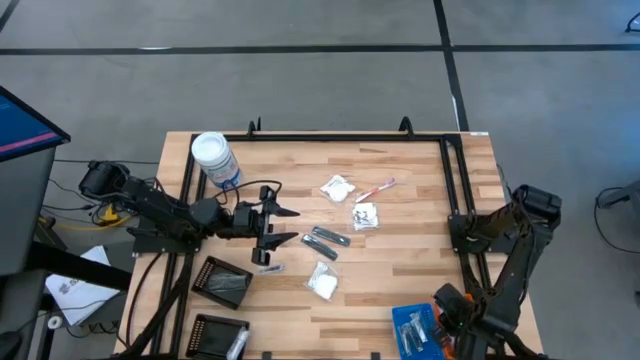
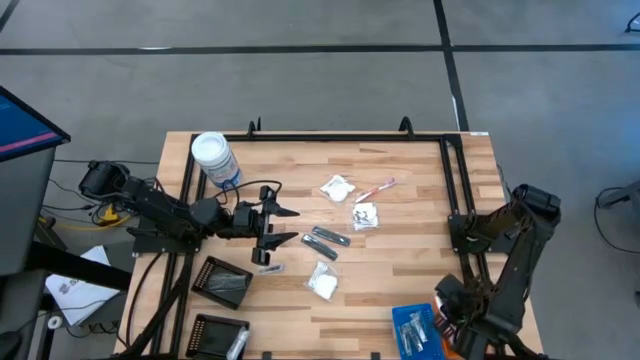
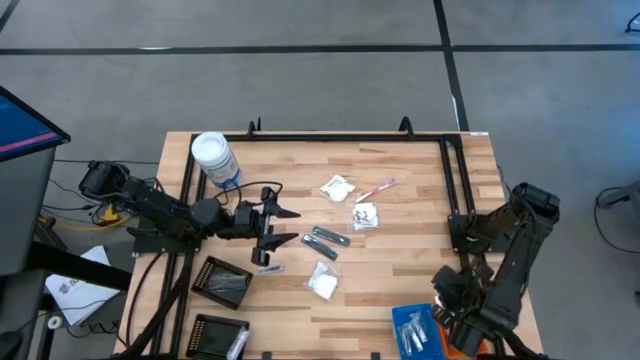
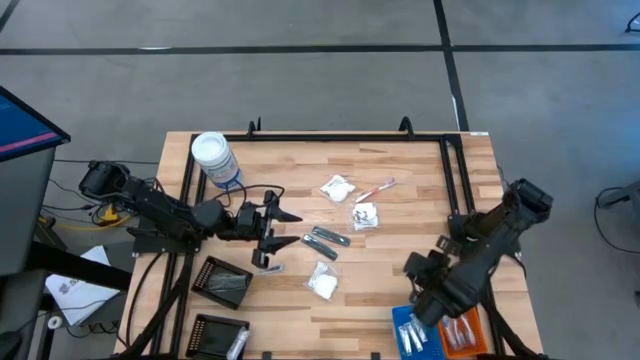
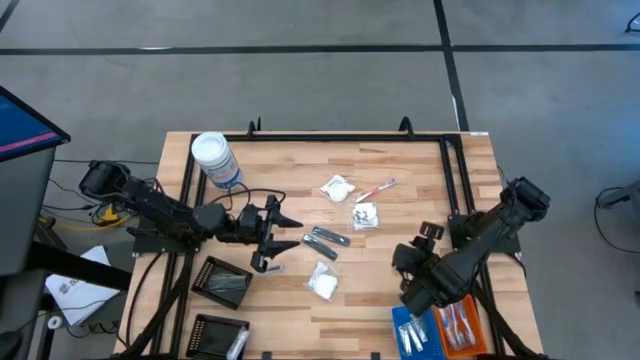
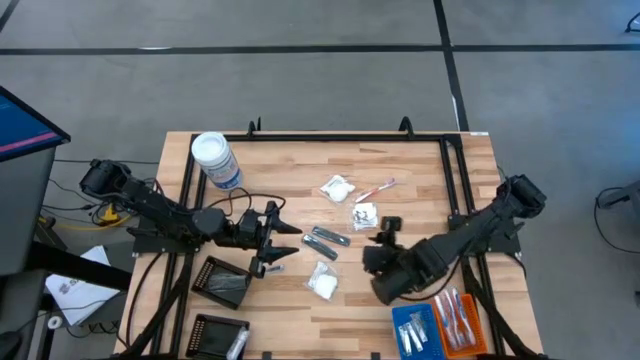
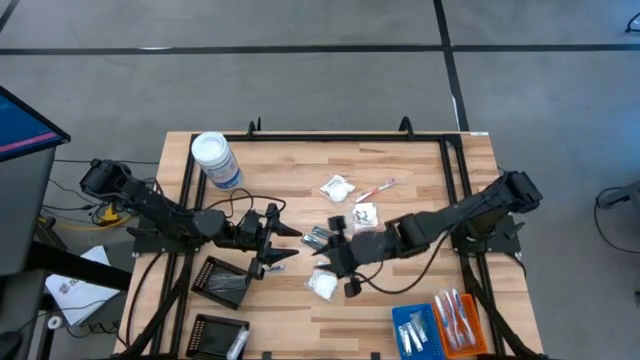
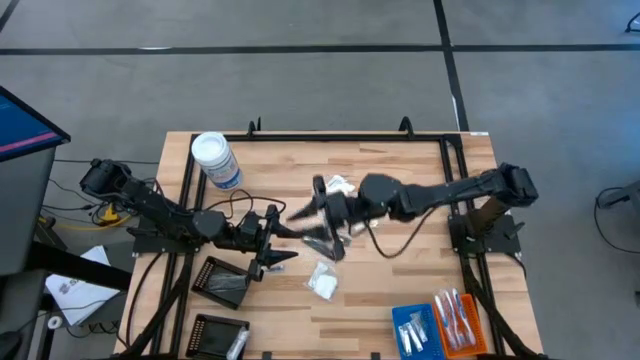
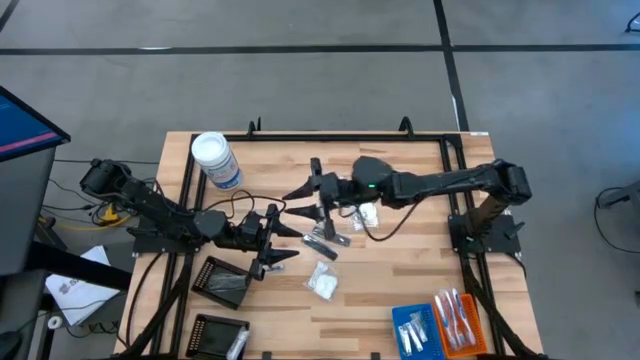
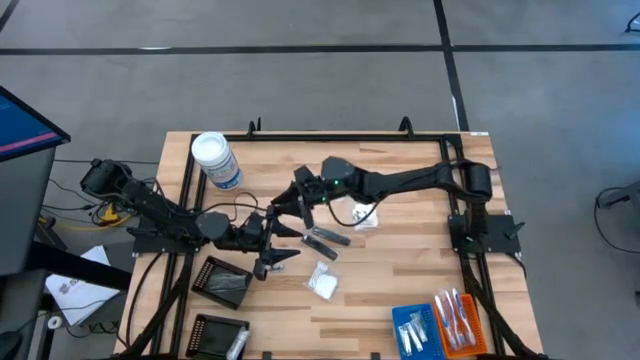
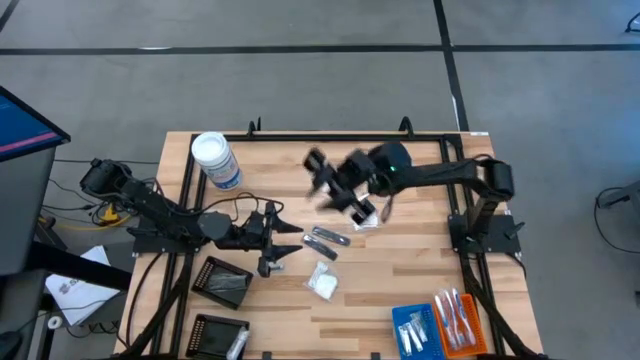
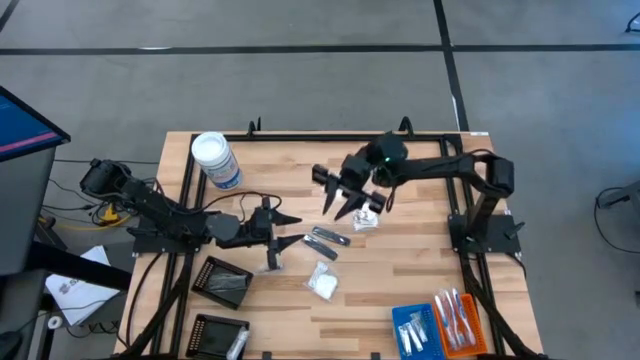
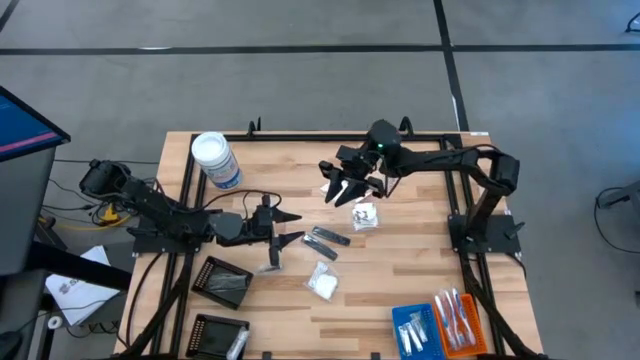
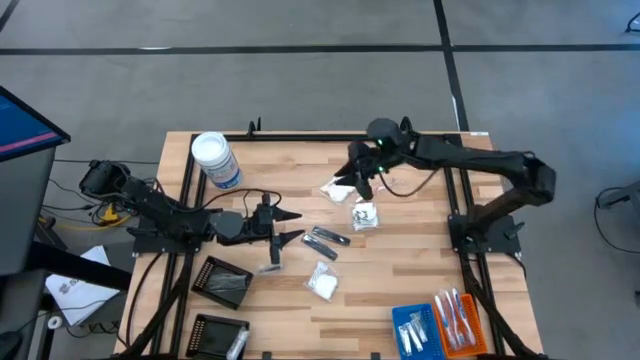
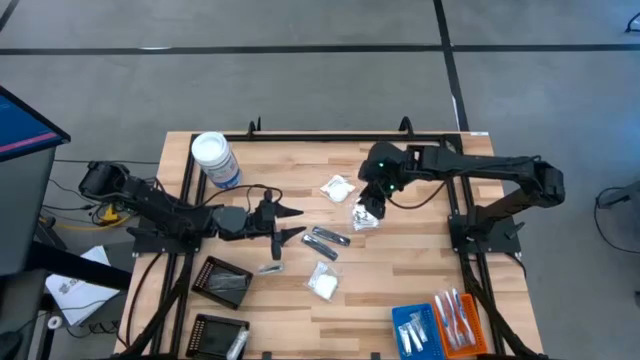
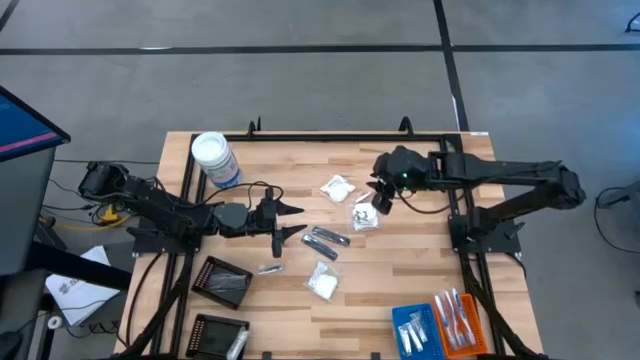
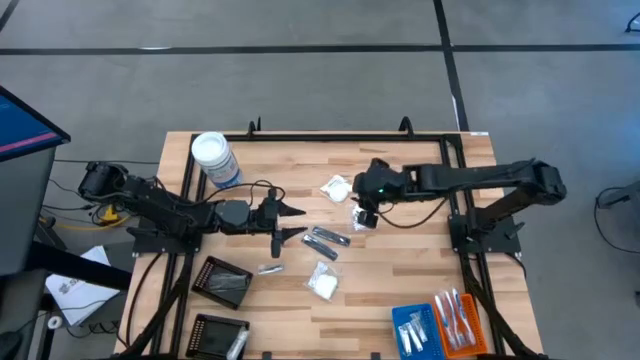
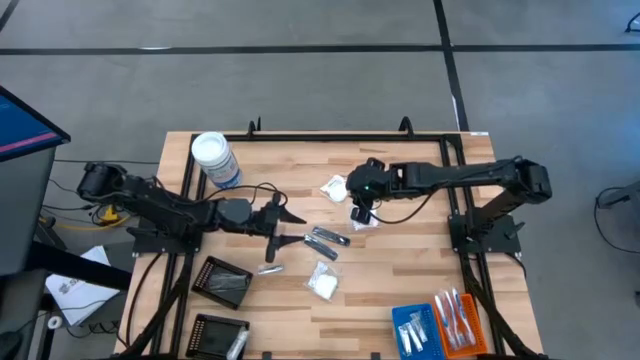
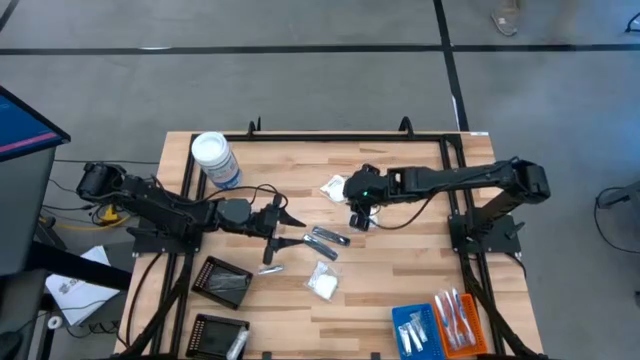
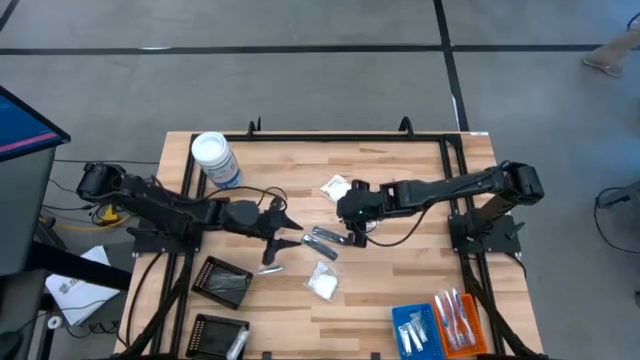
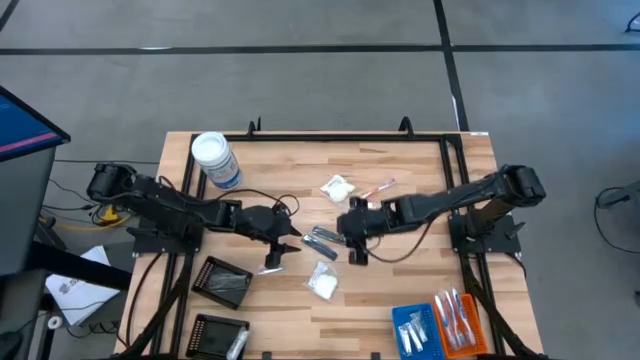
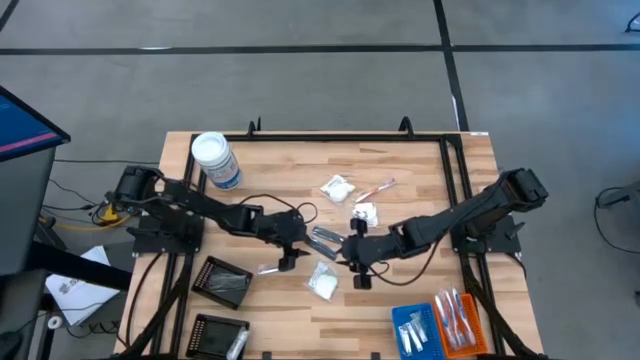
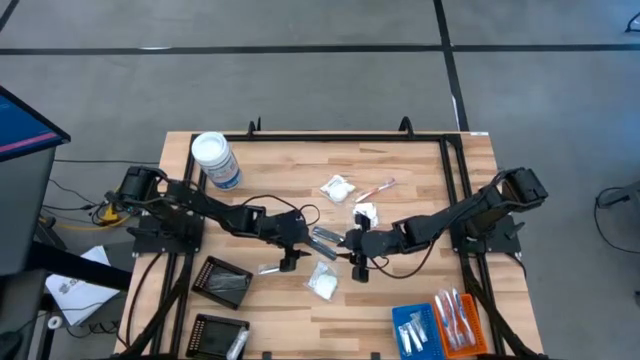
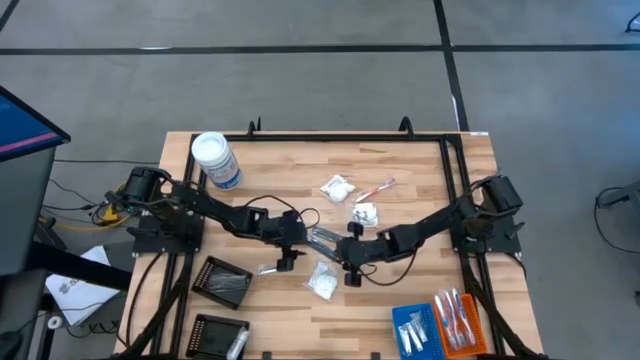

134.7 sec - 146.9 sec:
Task: Pick & Place Travel size toiletries
Put the black comb into the top black bin

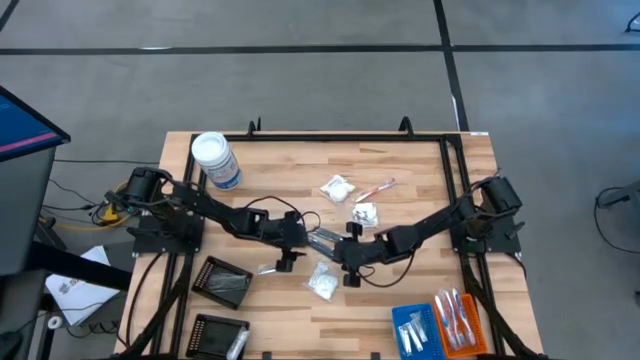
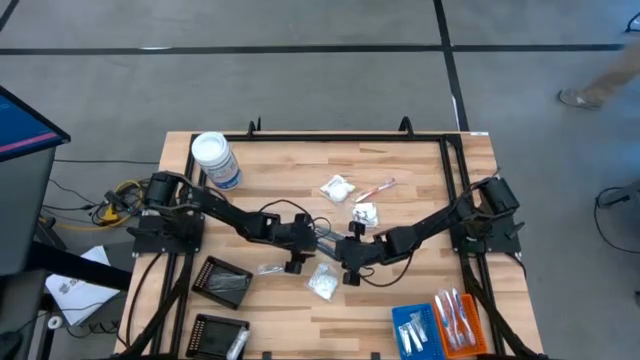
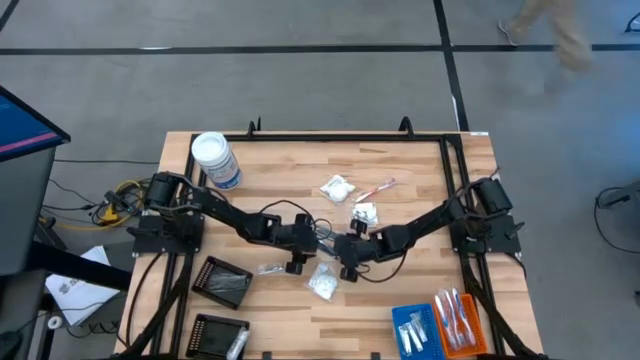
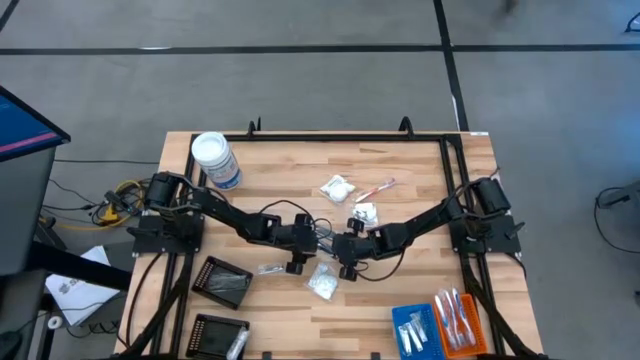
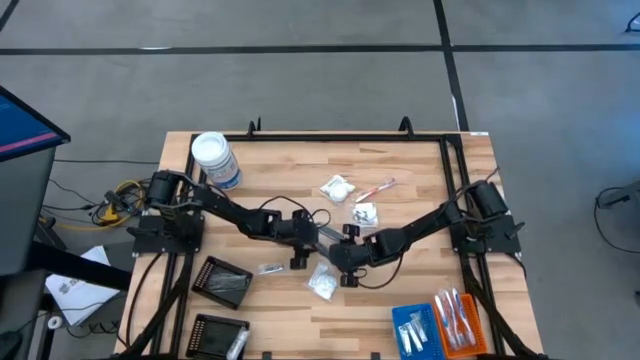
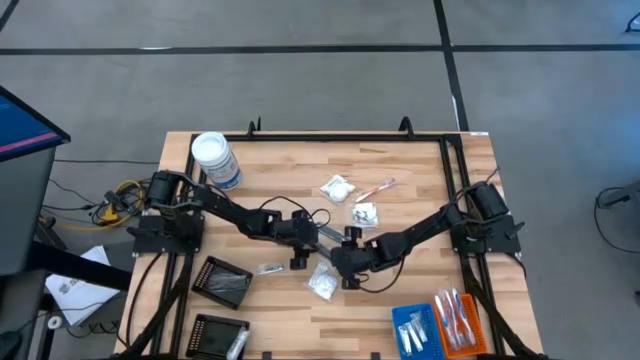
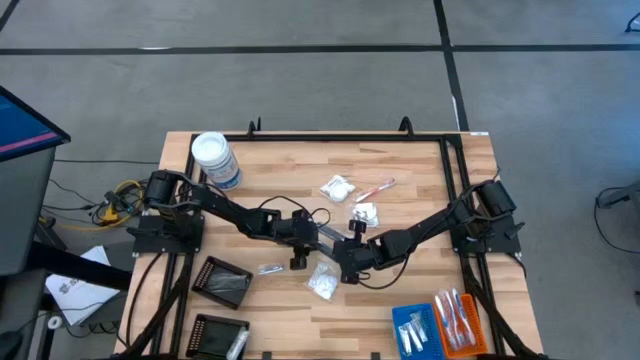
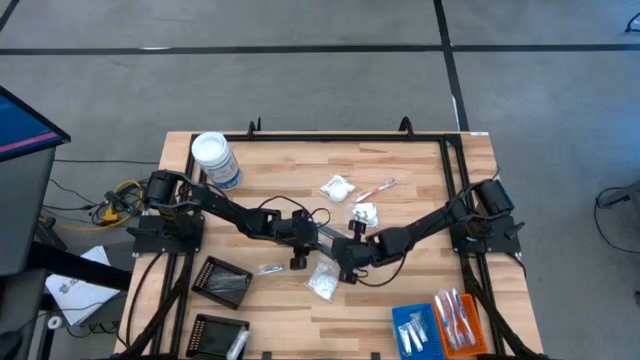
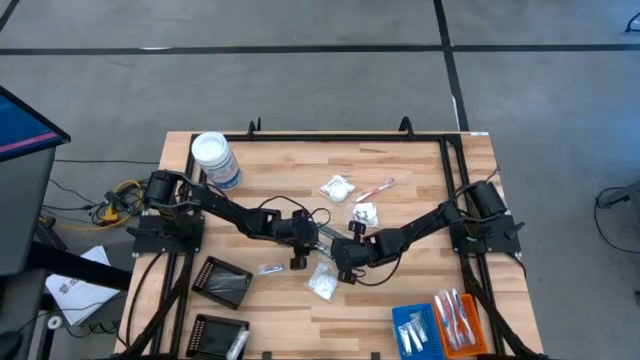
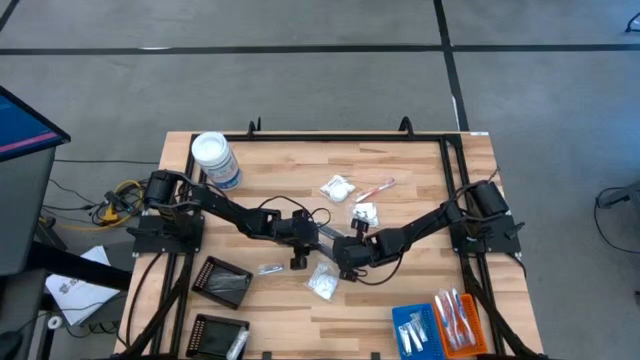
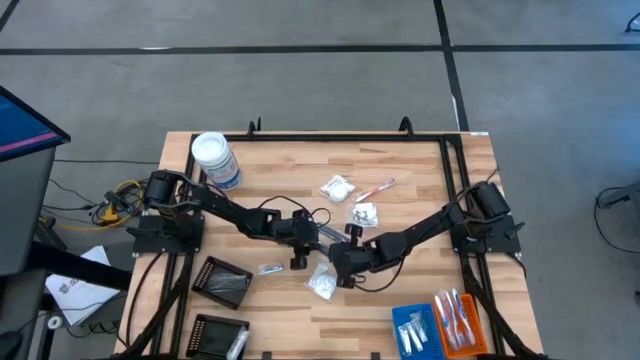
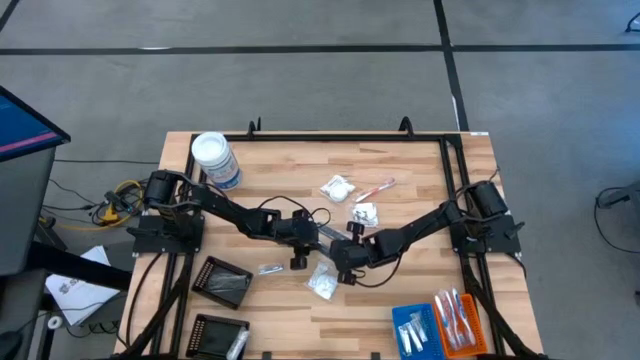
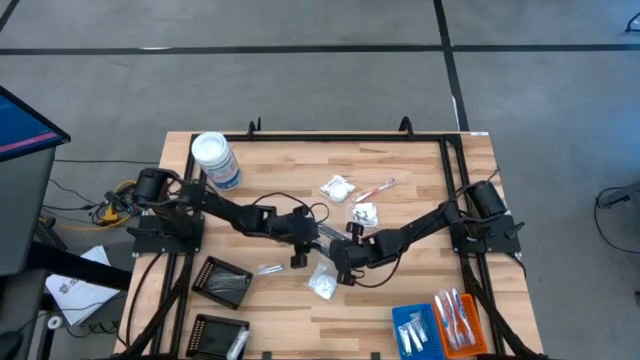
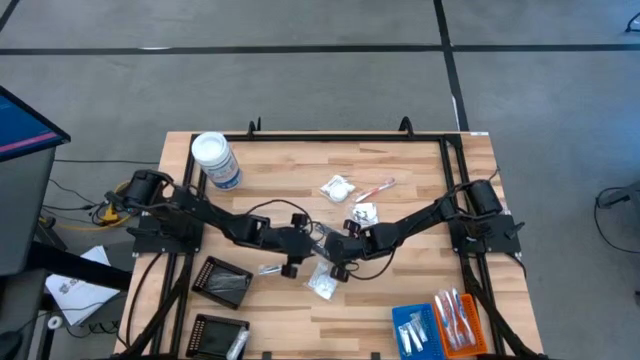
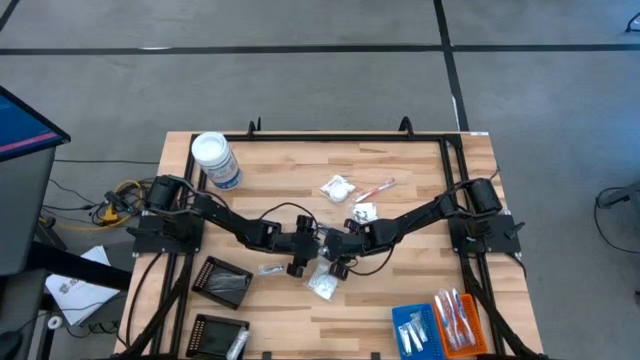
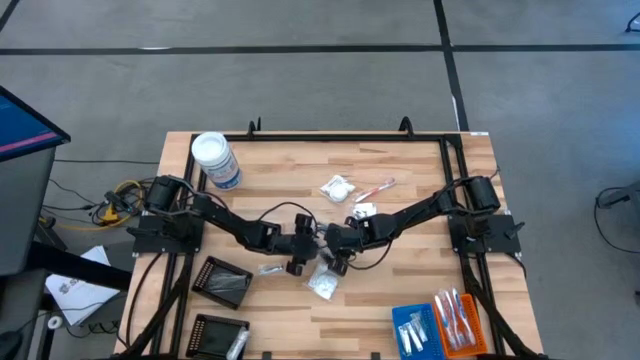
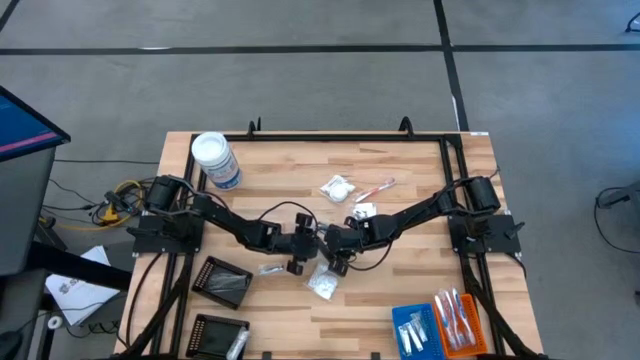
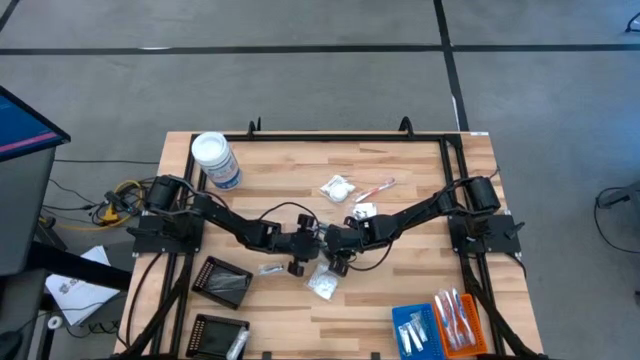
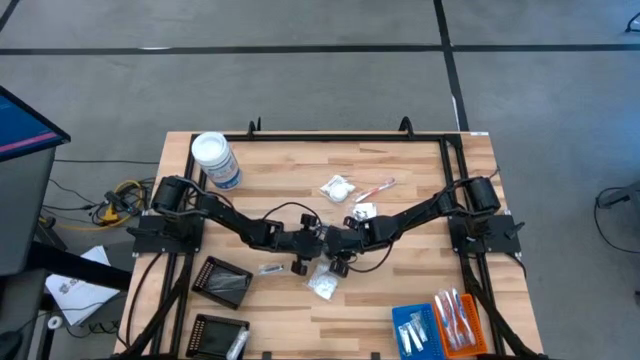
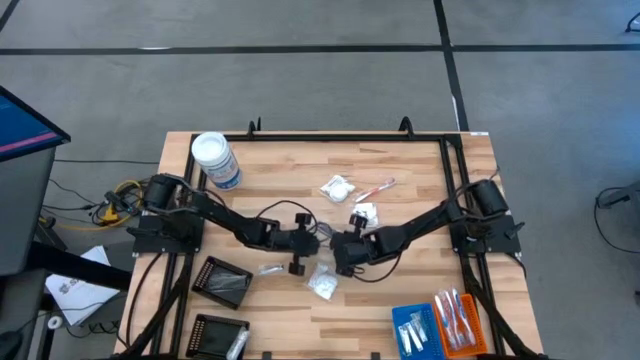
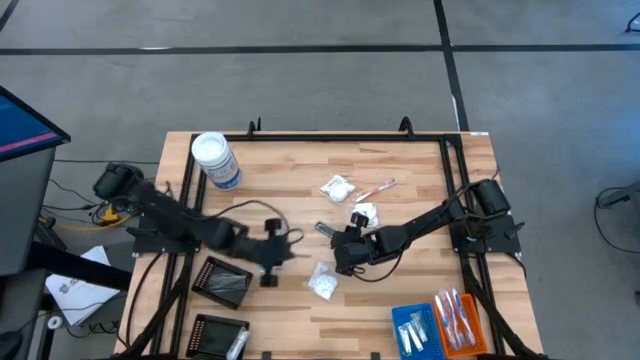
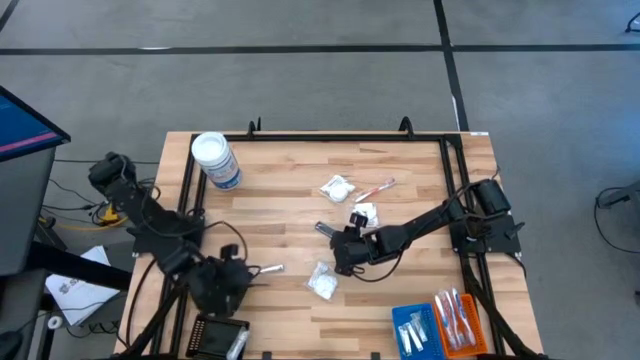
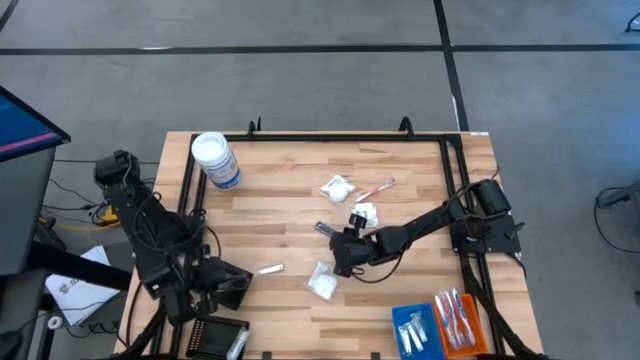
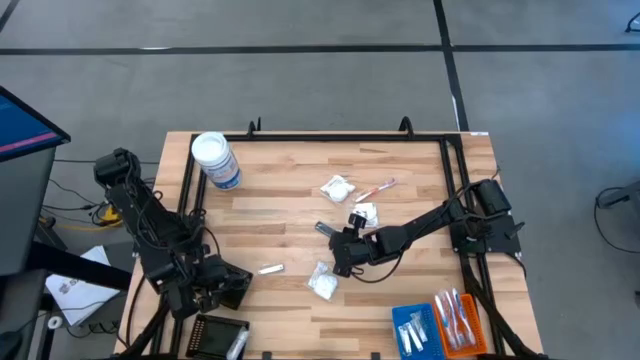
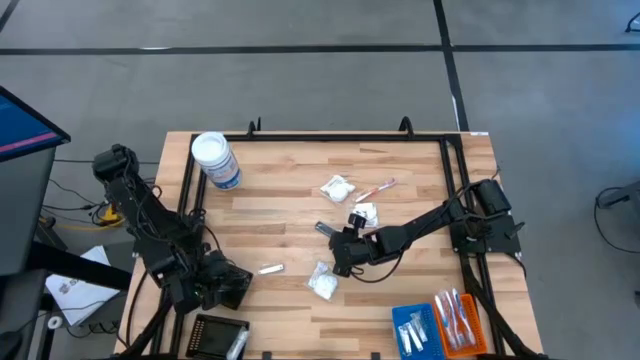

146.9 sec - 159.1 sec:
Put the black comb into the top black bin
